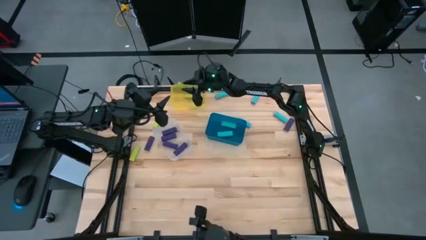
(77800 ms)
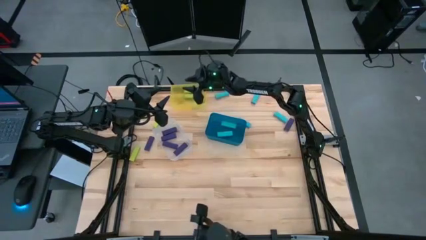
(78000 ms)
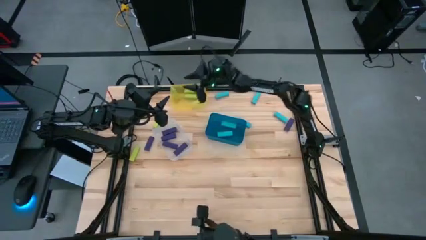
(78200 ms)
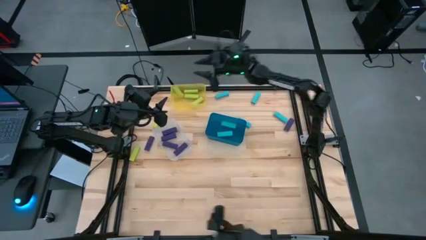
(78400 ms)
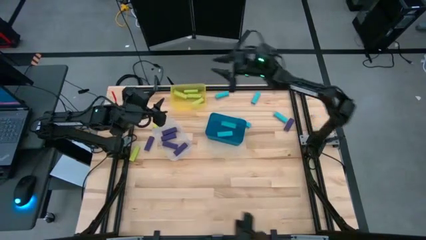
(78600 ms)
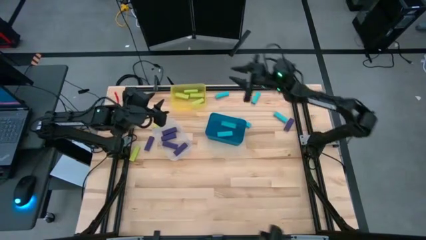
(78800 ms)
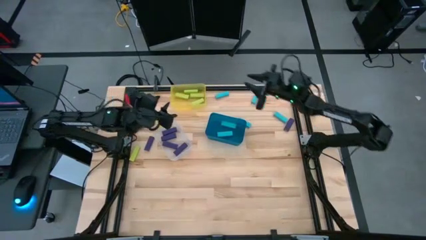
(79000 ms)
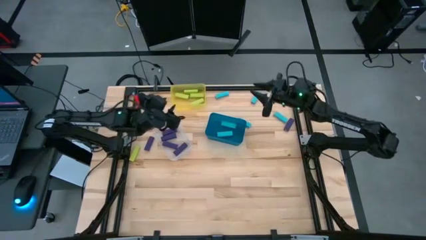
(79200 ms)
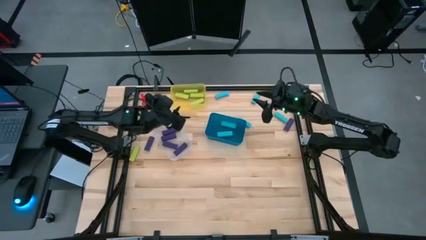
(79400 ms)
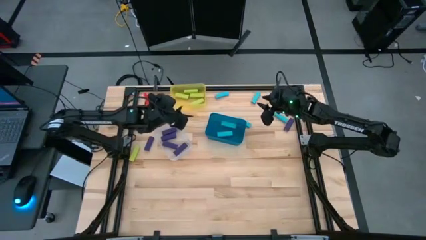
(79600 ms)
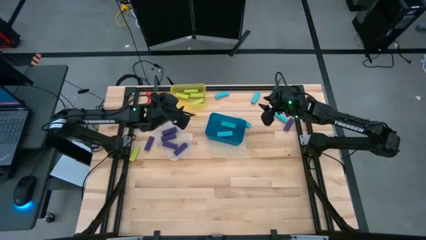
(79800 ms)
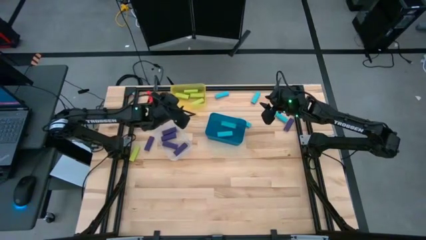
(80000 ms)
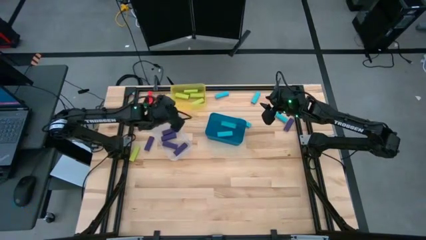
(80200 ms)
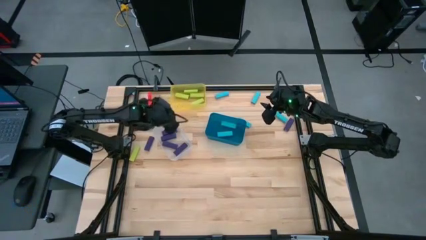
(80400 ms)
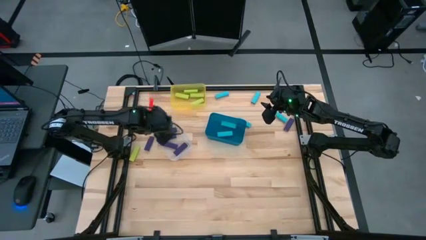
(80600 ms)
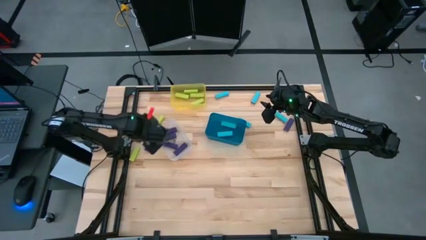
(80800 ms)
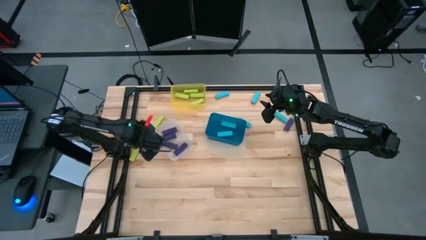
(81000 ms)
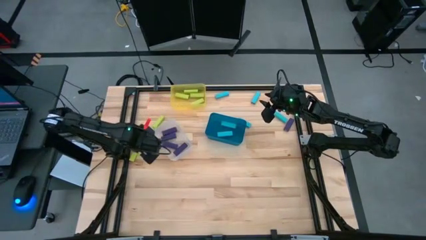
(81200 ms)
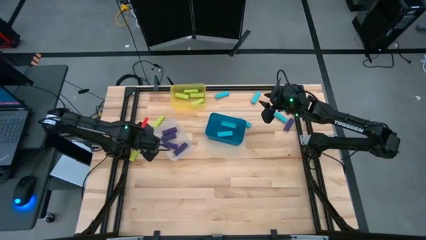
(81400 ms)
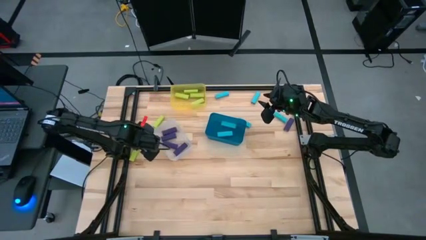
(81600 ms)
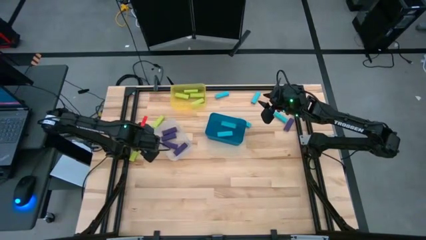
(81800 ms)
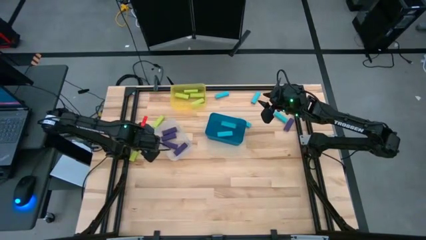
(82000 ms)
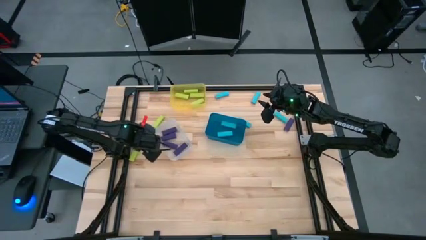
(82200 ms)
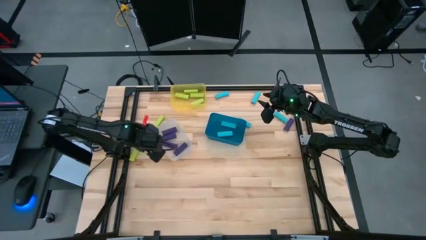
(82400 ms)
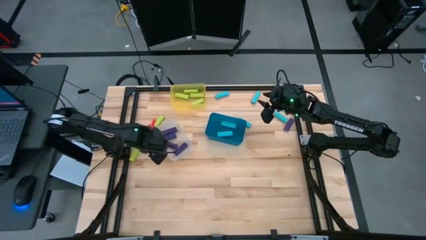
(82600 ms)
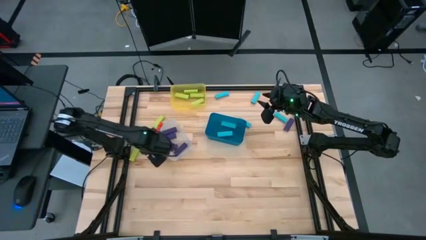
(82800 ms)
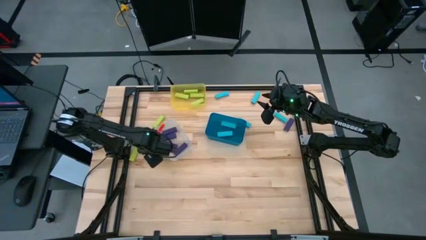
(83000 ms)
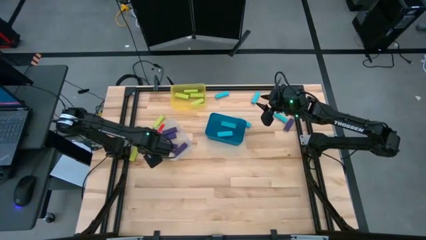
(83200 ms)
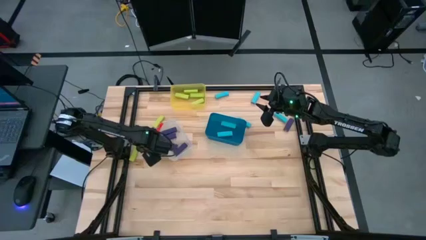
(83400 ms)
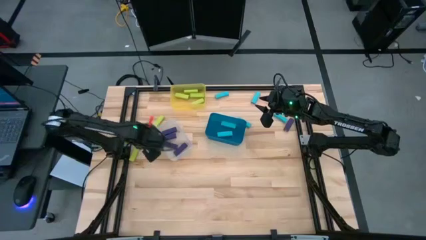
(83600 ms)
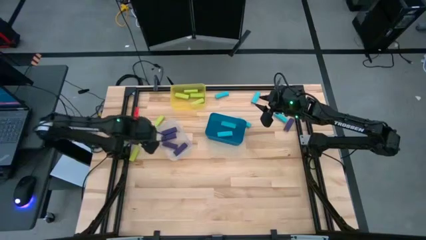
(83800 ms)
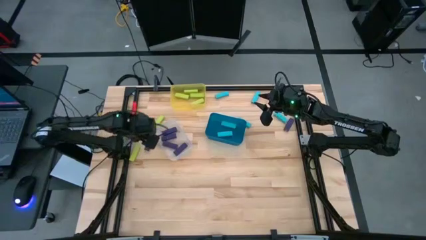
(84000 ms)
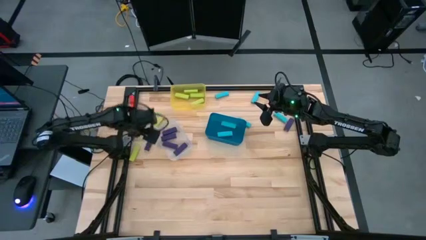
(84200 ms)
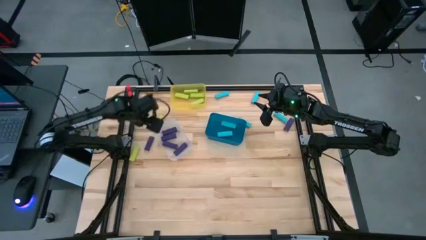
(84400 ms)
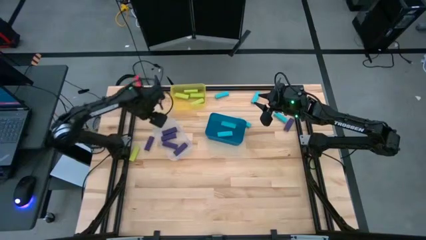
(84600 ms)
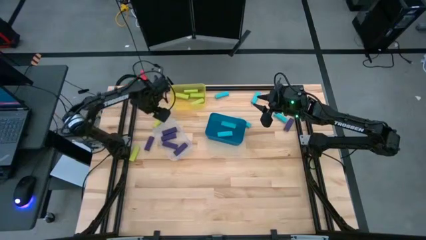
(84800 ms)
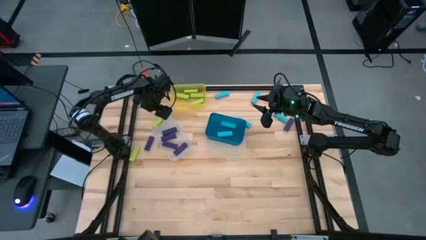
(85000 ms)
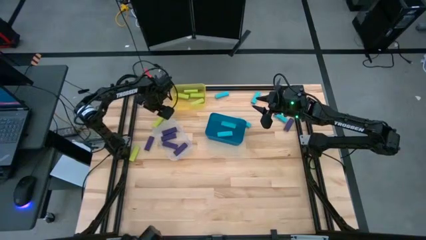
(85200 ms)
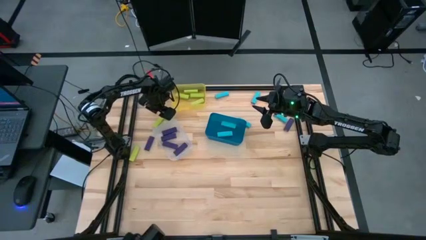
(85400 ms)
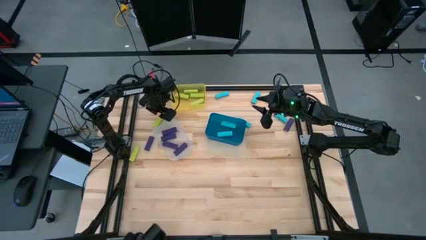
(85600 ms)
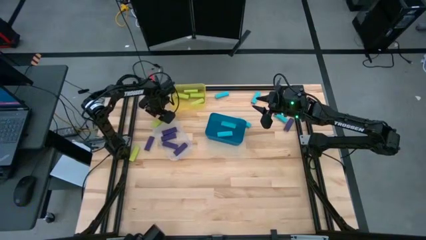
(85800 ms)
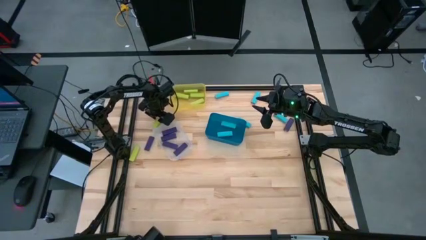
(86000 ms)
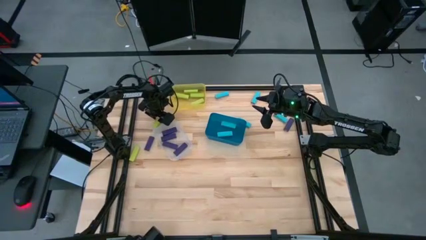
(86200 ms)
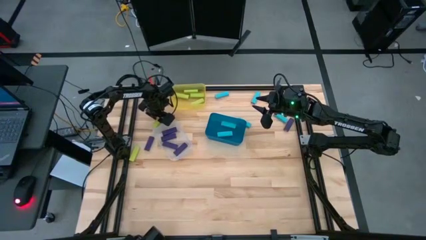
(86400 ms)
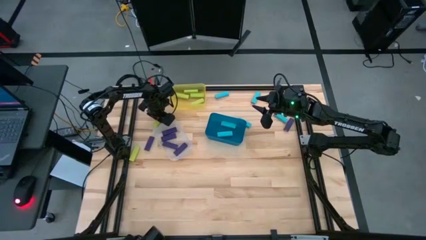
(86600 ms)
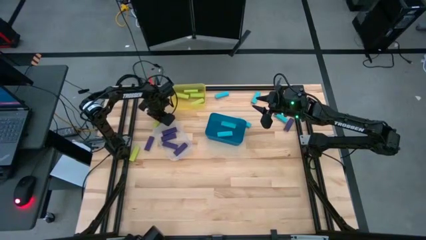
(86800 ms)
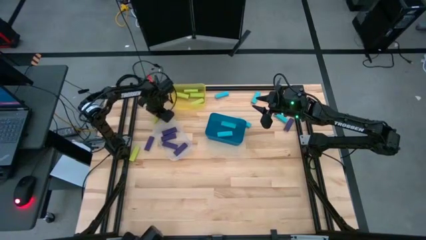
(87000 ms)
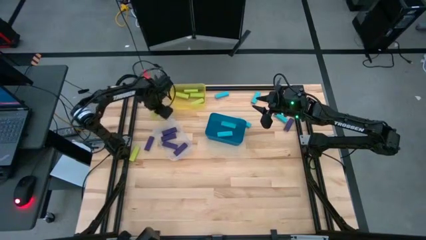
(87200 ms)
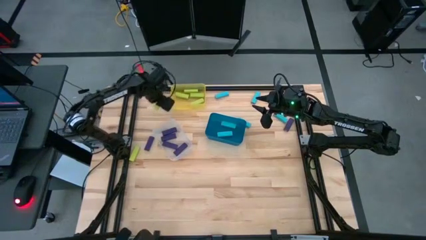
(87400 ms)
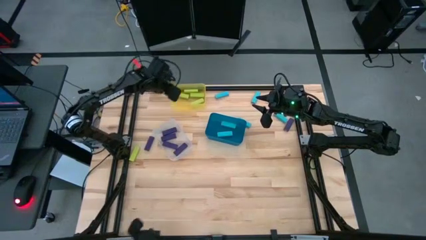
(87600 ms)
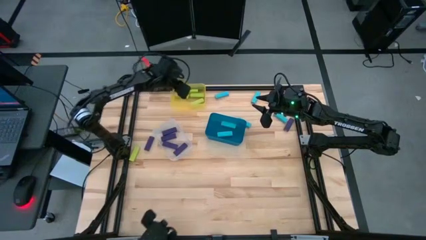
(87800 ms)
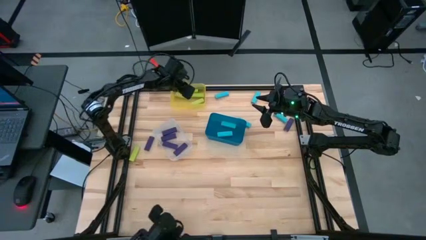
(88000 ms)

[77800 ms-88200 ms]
Task: Sort blocks
Put the green block into the yellow bin

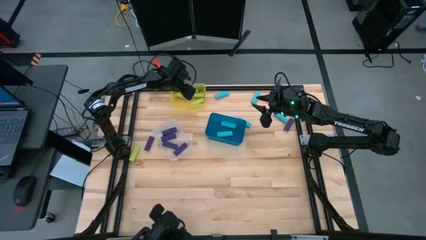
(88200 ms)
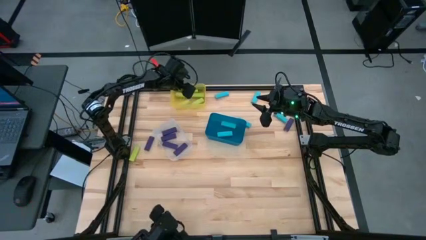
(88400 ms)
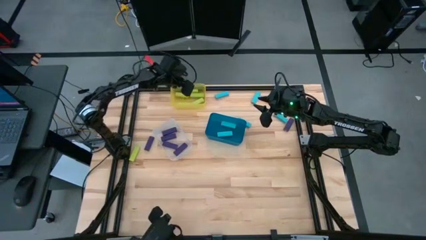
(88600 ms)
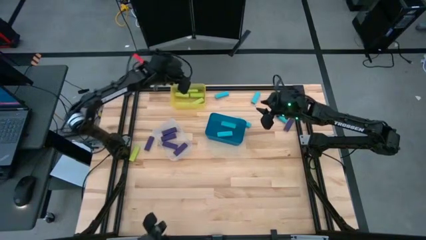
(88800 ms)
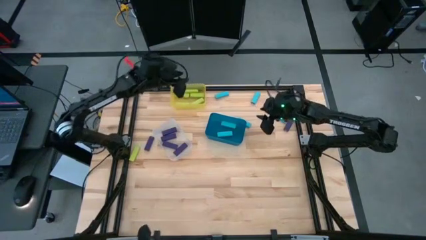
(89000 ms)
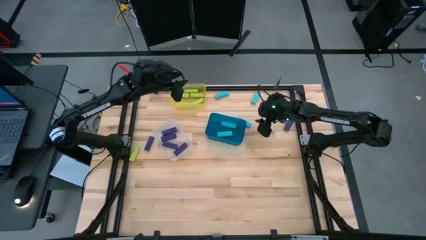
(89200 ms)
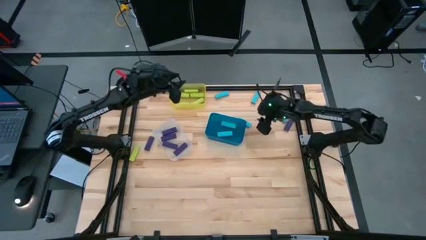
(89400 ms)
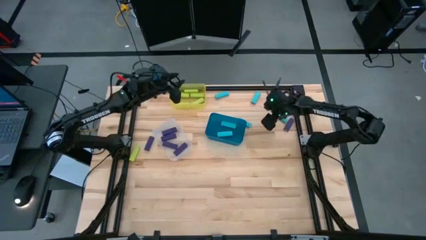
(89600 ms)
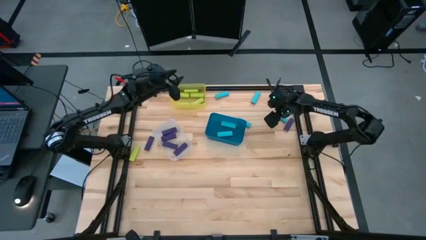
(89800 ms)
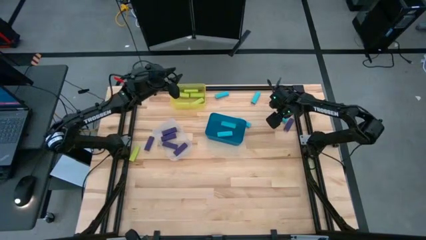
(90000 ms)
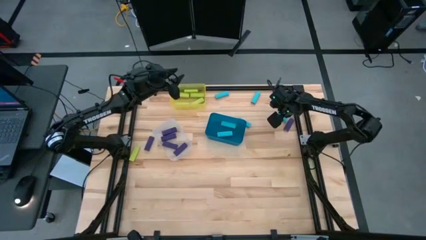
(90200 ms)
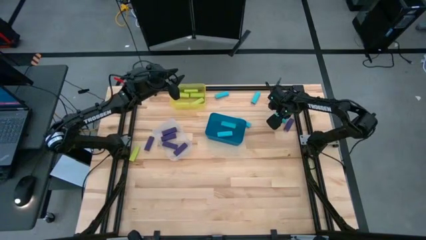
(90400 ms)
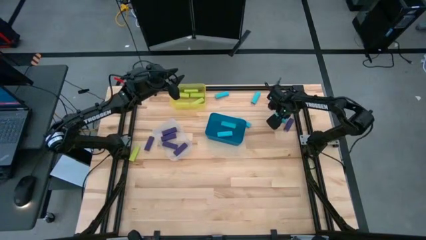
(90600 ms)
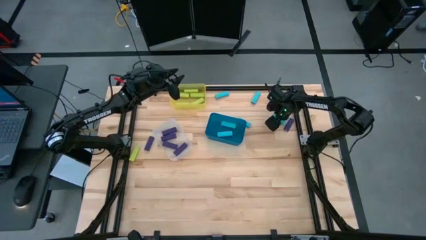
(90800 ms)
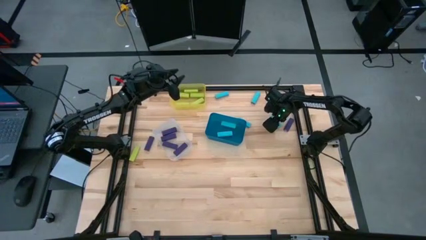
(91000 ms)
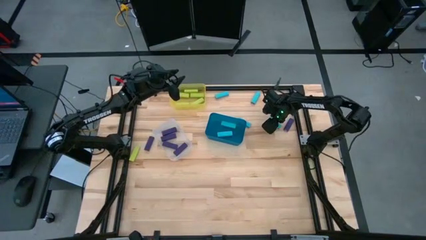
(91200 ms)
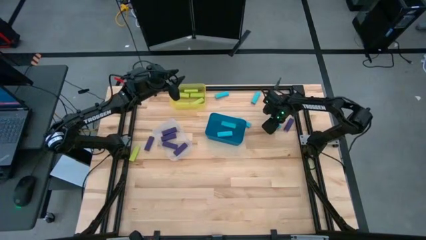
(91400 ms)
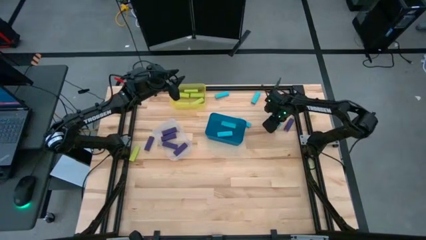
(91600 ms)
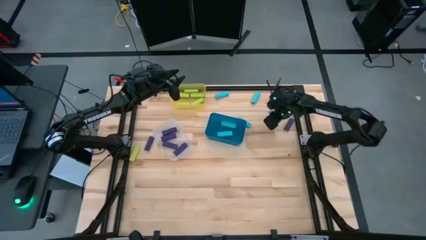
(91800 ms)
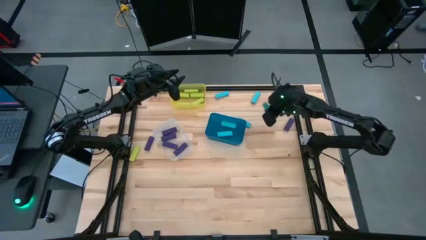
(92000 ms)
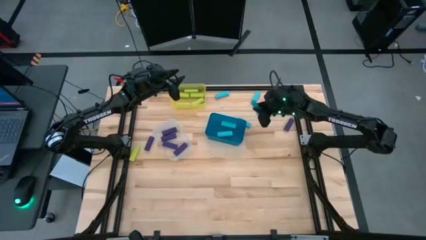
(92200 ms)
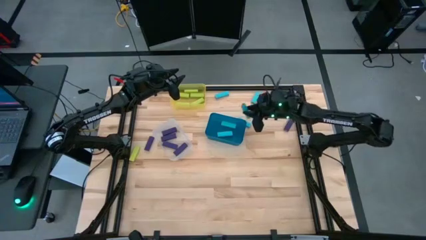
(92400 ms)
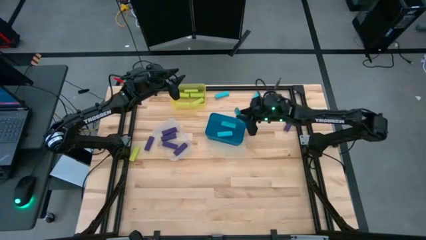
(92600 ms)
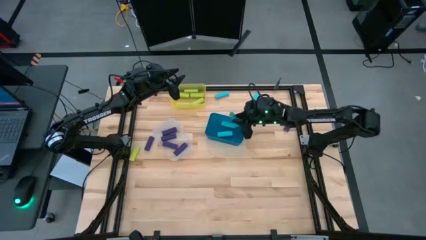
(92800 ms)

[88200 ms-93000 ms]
Put the blue block into the blue bin

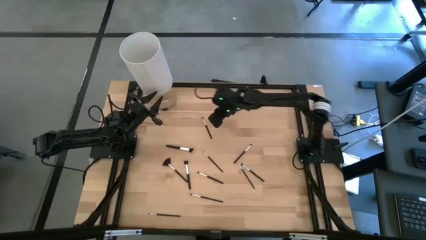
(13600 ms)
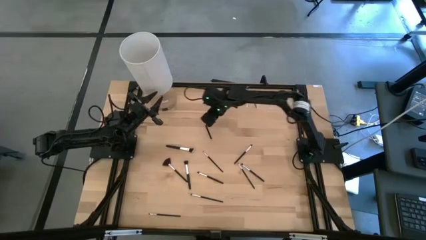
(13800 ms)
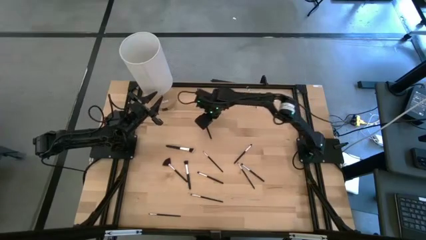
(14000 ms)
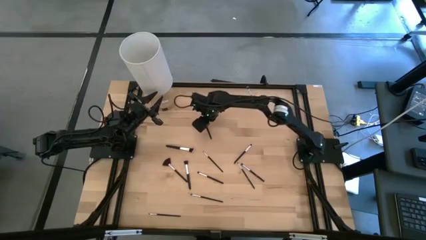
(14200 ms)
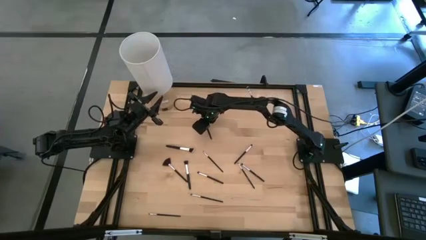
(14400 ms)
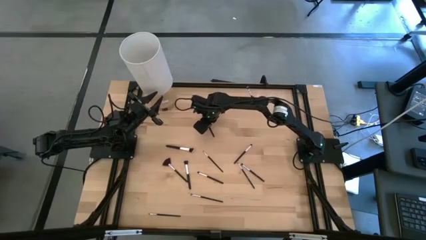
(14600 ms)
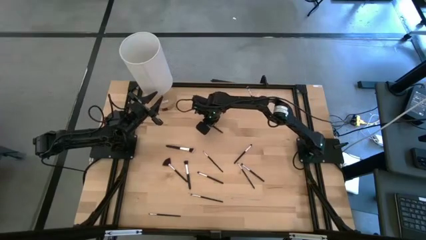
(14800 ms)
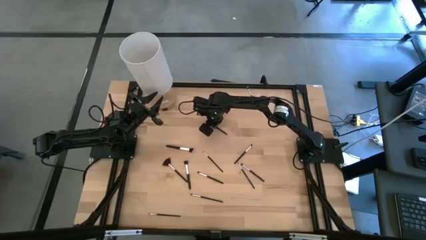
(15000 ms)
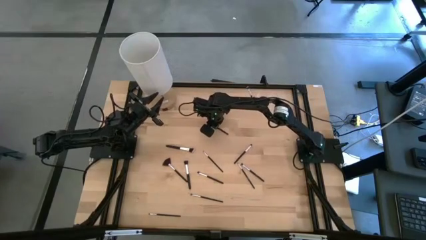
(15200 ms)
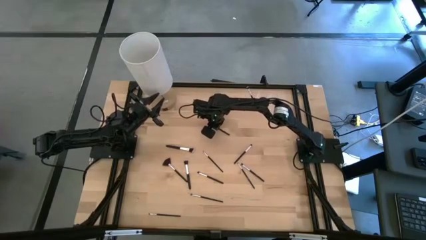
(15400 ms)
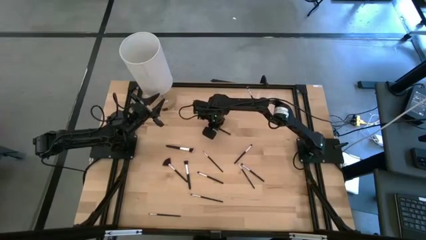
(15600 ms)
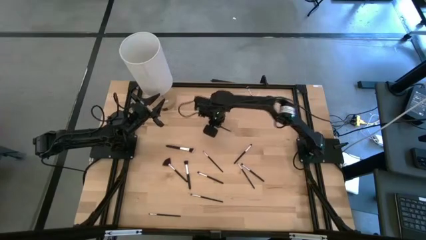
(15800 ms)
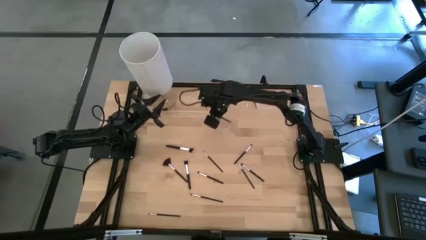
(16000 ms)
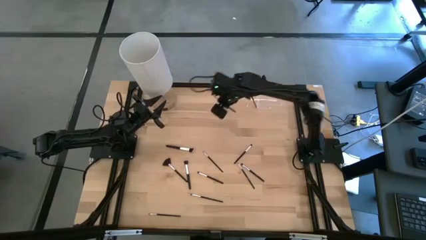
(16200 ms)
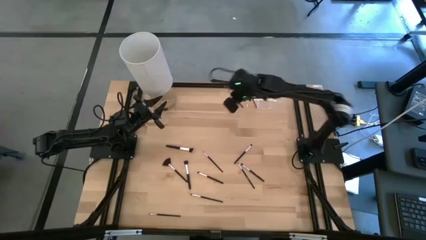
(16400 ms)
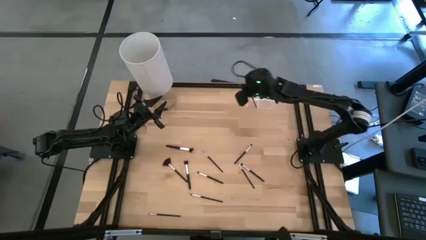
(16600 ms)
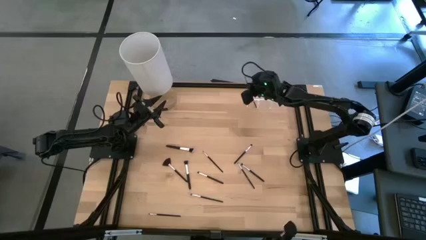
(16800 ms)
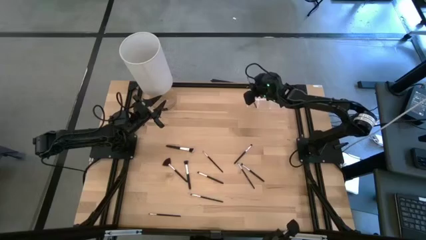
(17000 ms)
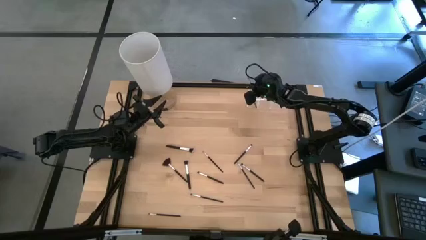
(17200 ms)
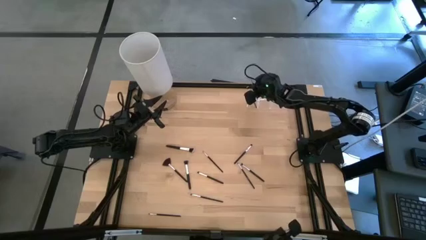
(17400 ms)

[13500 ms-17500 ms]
Task: Put items in baskets/containers
Put the eyeshadow brush into the left side of the transparent organizer
